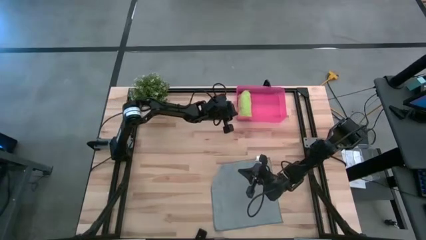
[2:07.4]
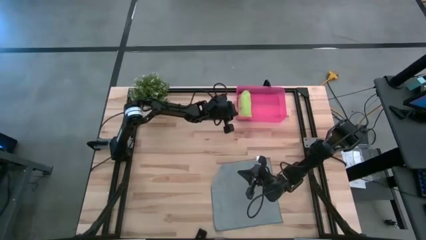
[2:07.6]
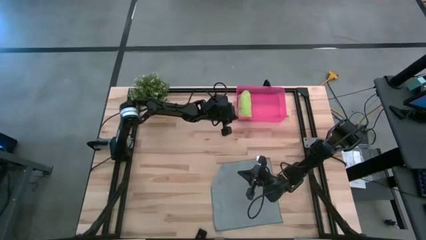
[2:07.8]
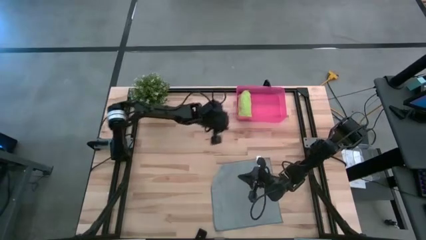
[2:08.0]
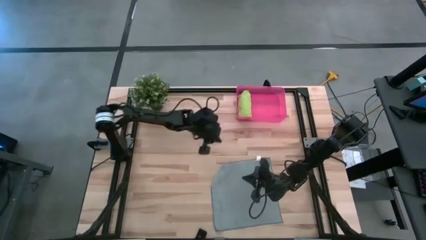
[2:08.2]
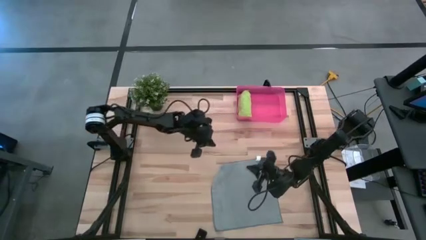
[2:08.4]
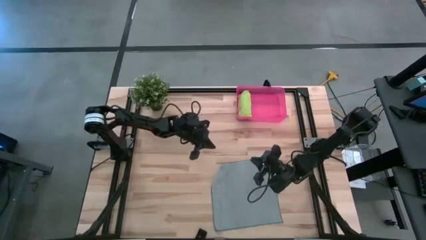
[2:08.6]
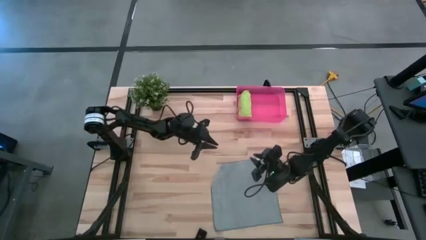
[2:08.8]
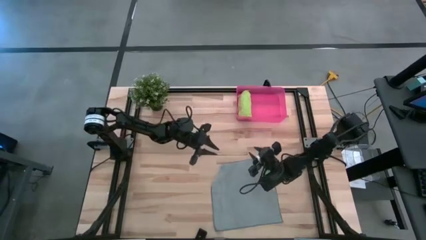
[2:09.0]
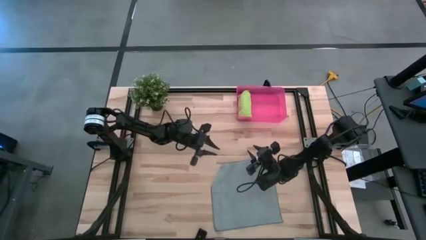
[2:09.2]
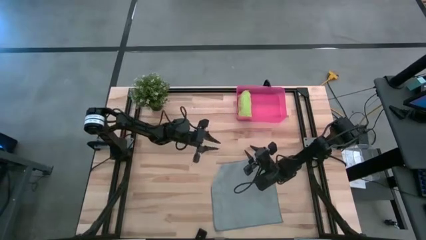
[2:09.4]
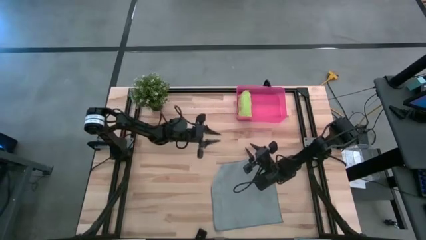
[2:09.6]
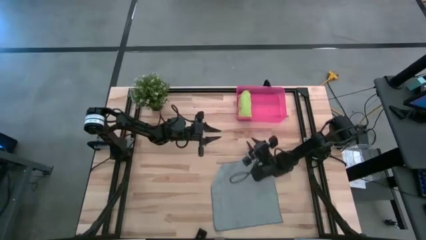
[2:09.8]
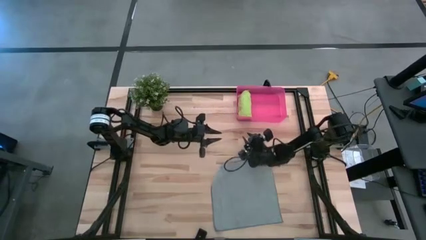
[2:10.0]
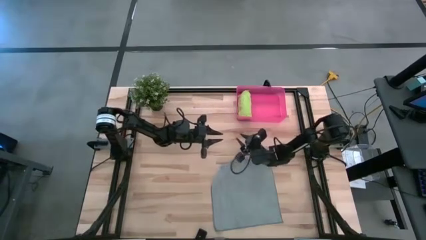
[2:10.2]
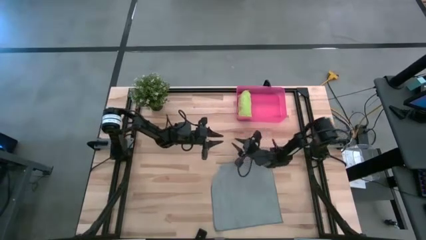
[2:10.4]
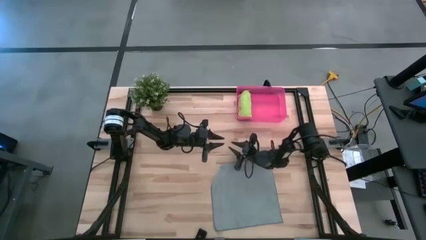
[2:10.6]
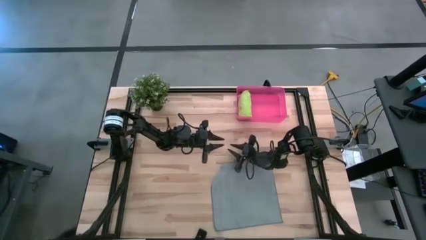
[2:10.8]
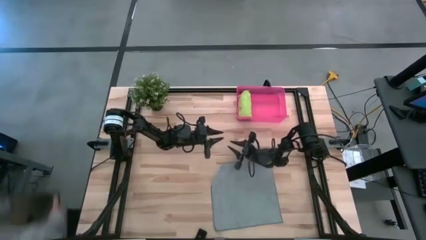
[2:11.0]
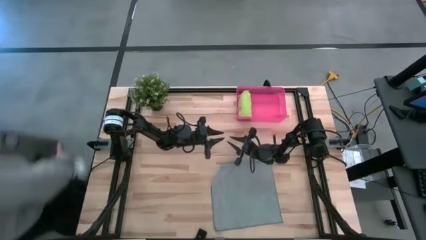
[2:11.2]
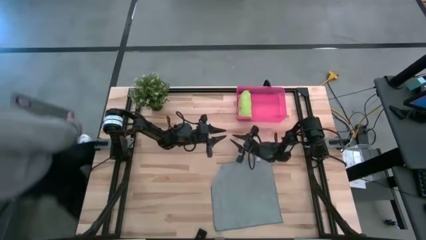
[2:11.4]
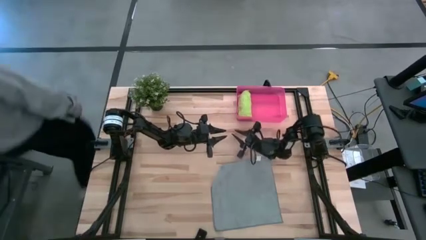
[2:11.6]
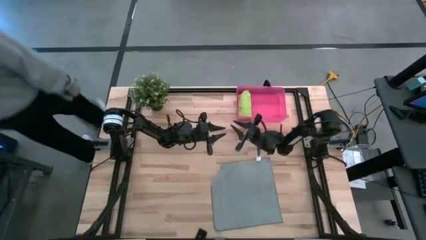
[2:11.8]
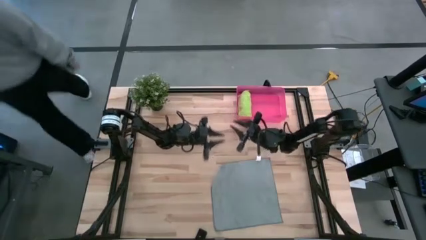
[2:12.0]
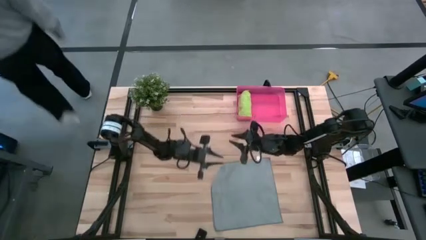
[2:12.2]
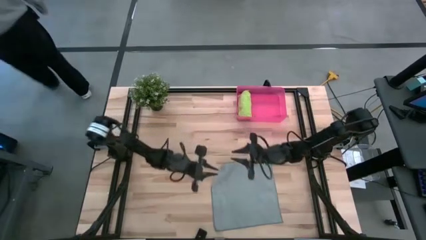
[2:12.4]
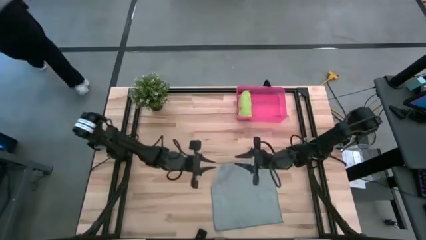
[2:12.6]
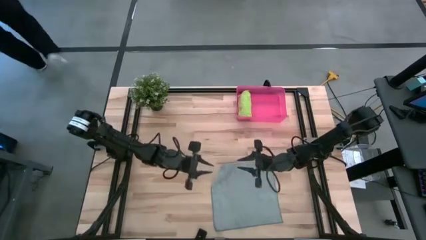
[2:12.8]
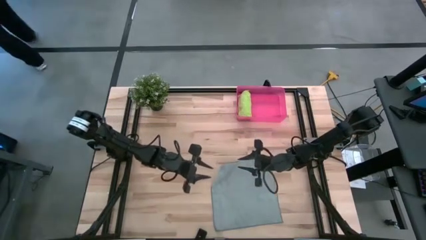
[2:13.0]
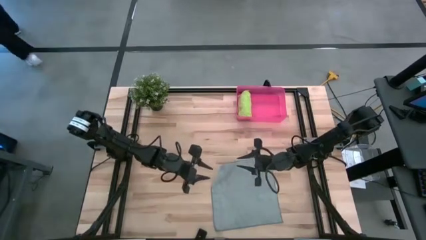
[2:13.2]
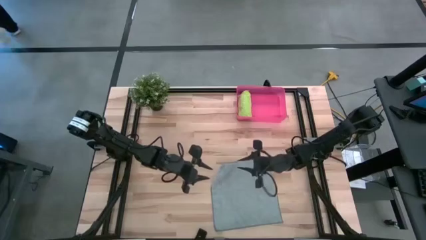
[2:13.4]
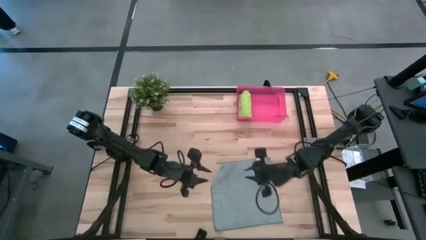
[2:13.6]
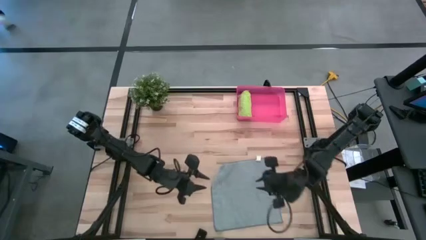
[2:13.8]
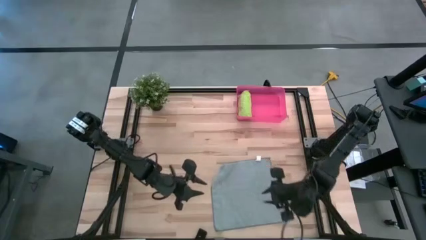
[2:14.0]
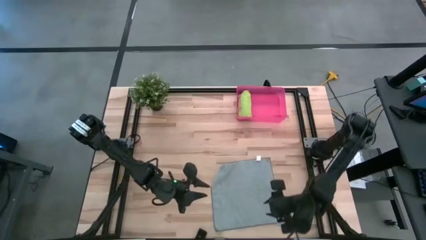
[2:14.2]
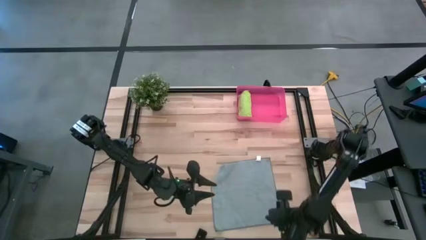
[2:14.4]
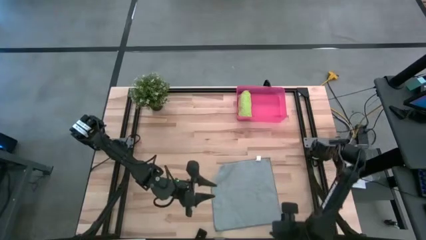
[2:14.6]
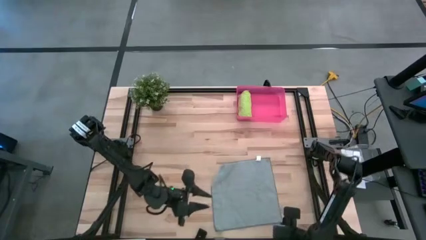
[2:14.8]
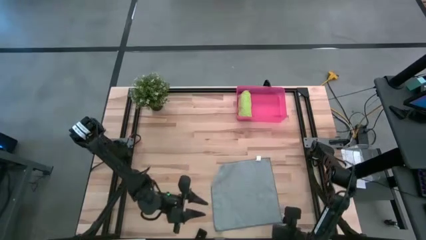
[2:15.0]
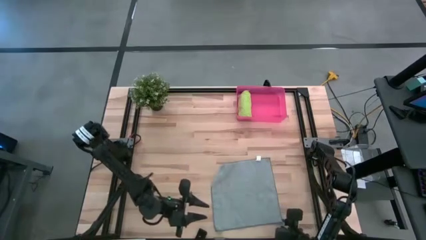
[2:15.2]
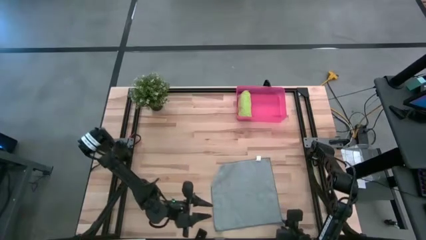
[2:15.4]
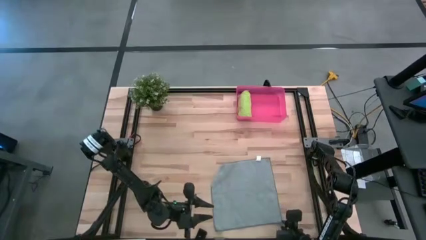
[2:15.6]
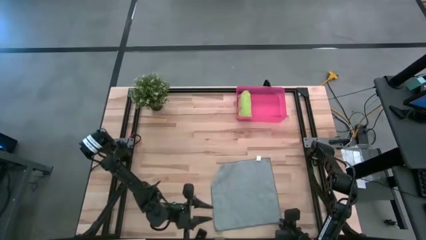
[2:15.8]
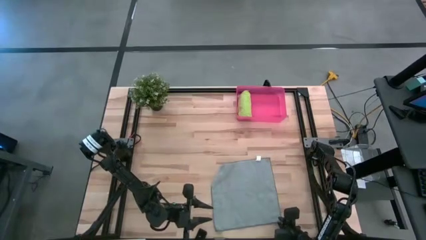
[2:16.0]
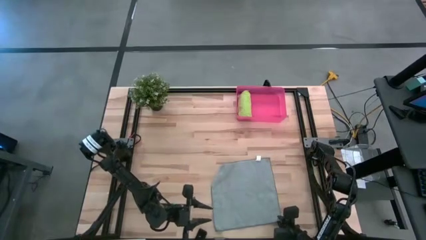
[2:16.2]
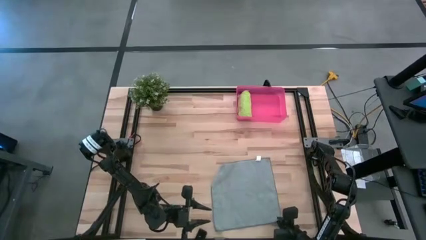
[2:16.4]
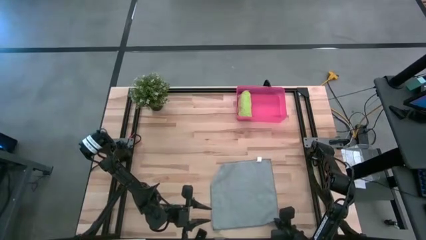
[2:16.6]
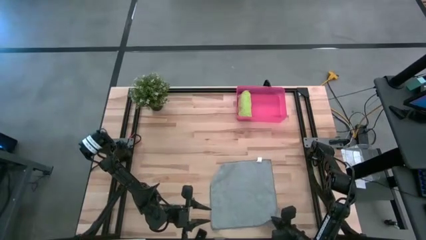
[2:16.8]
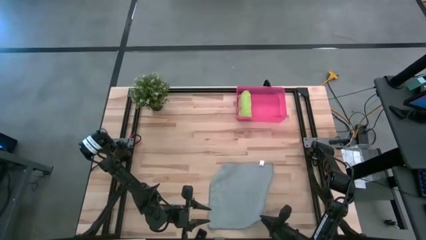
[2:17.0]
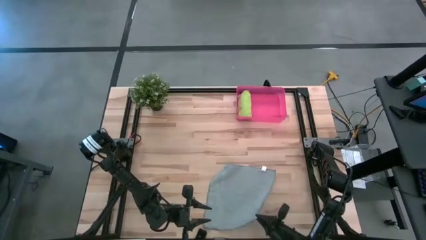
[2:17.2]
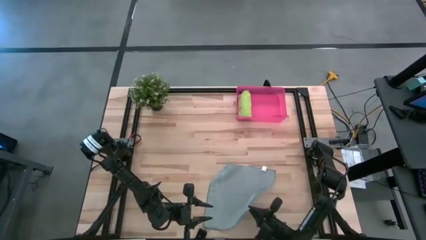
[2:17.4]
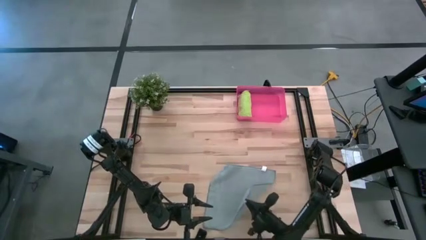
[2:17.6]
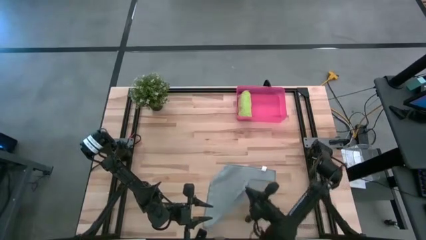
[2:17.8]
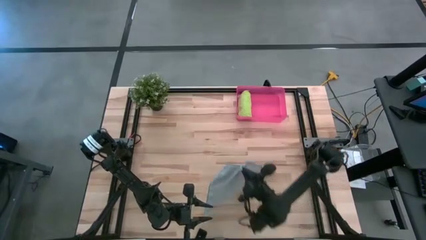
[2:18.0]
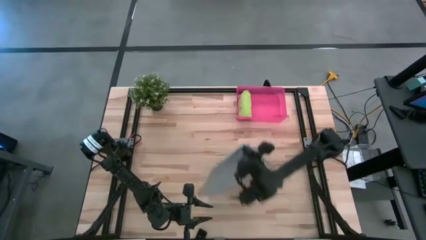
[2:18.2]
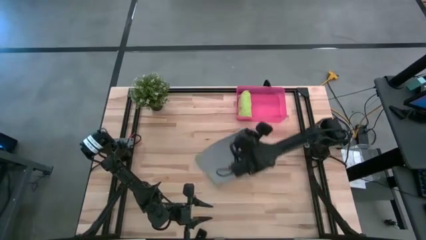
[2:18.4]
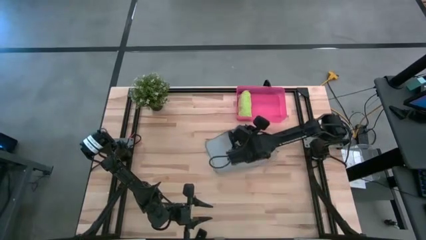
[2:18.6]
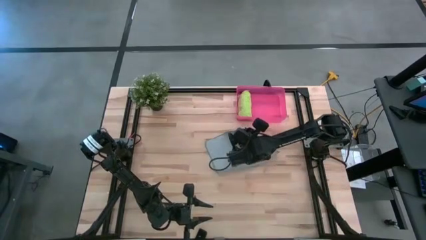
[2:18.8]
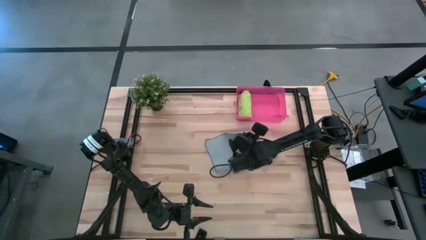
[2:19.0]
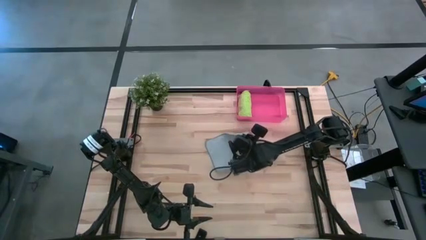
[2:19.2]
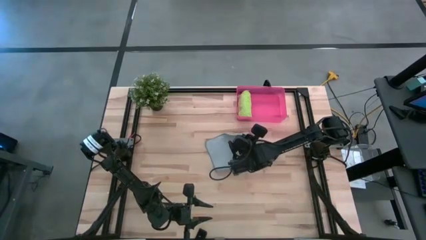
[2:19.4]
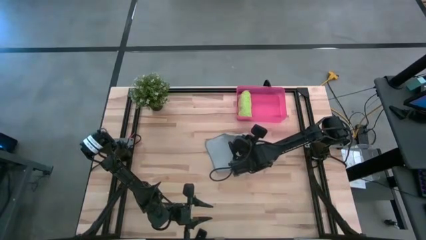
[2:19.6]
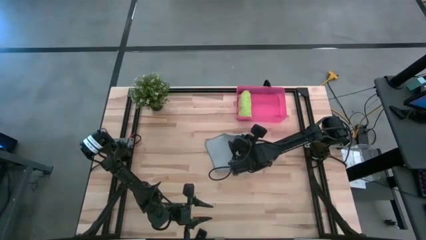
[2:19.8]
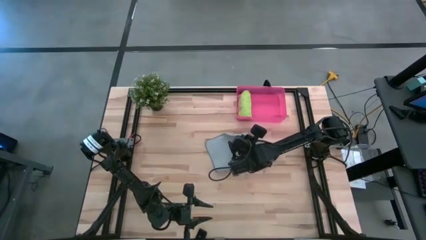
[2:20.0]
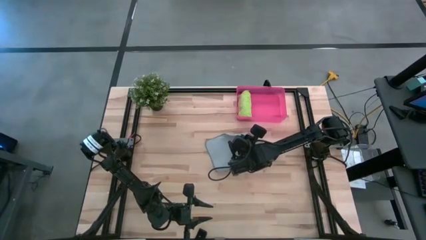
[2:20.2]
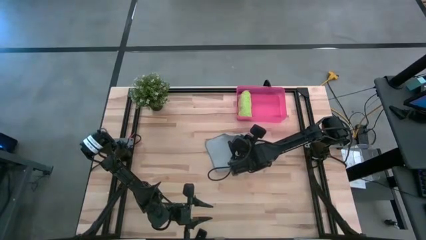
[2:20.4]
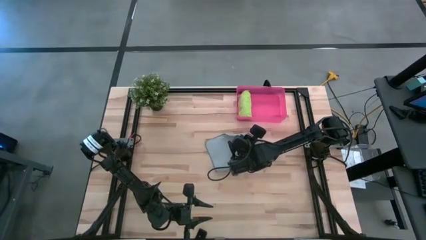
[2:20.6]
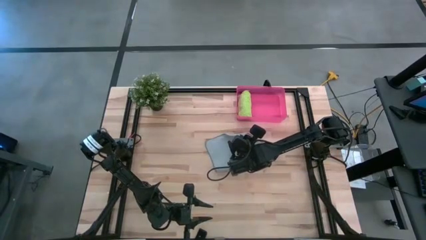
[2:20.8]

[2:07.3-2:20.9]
Task: Roll microfiber towels into tight, uniform cylinder then place into a basket
Fold the gray microfiber cloth
